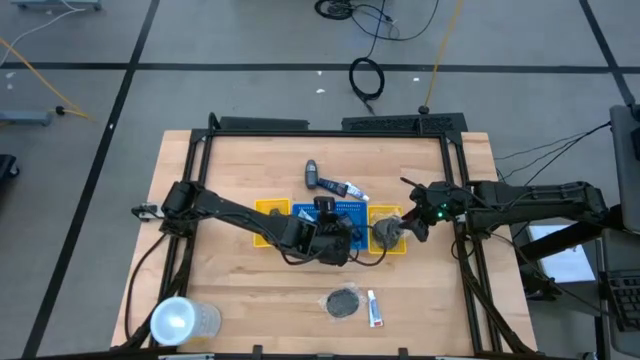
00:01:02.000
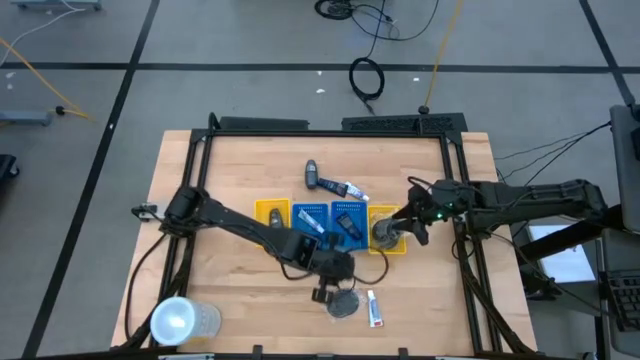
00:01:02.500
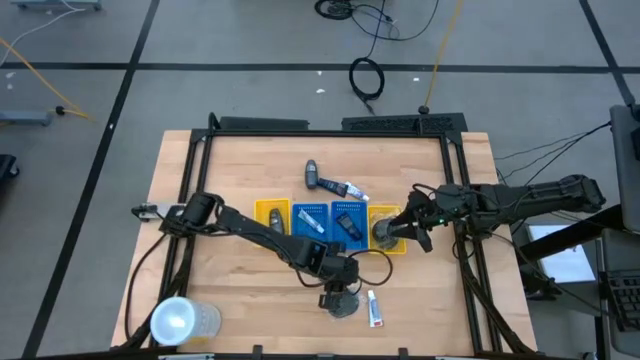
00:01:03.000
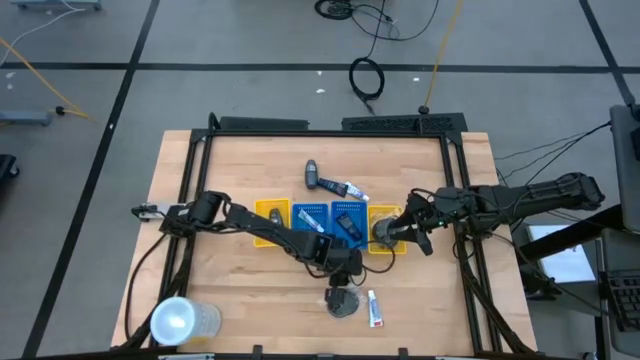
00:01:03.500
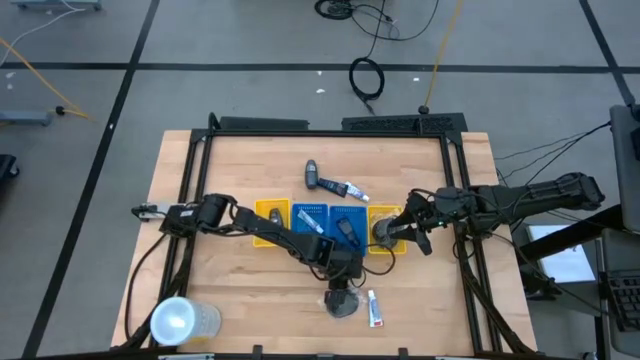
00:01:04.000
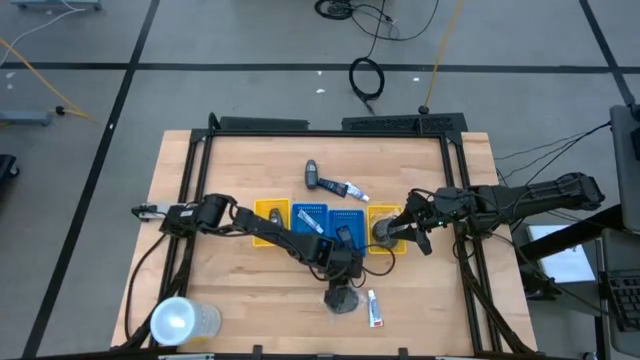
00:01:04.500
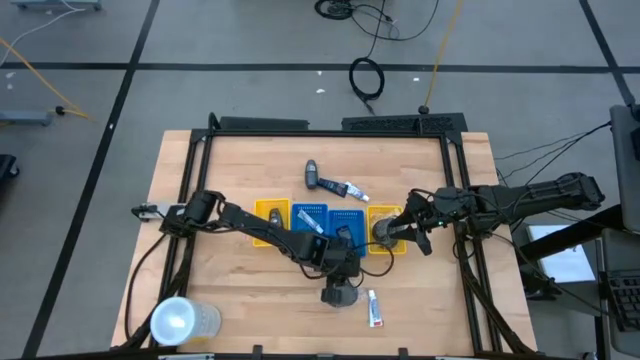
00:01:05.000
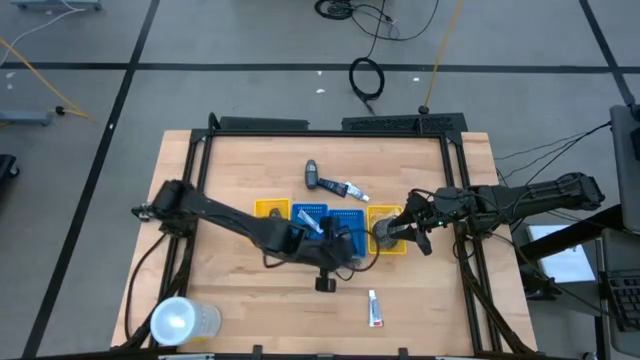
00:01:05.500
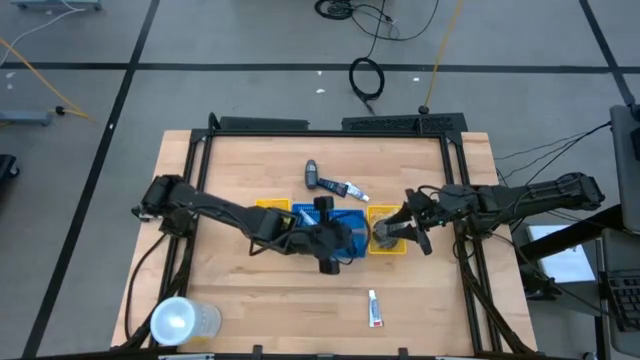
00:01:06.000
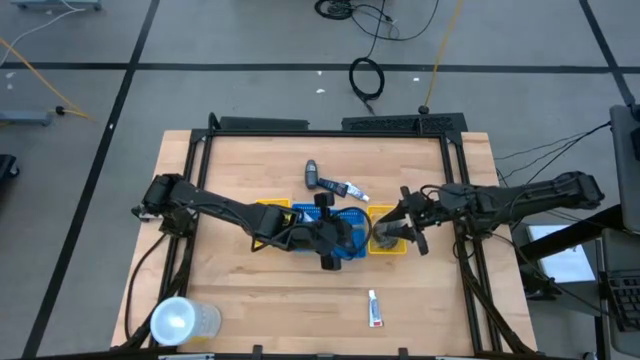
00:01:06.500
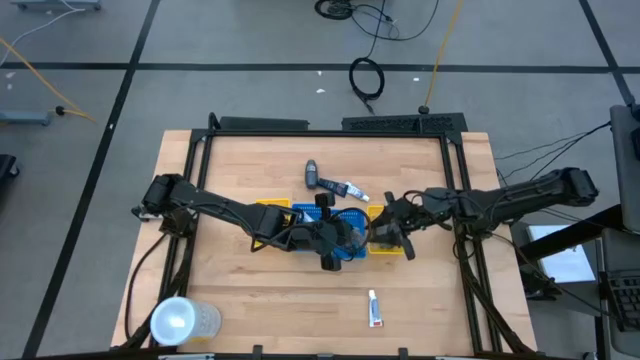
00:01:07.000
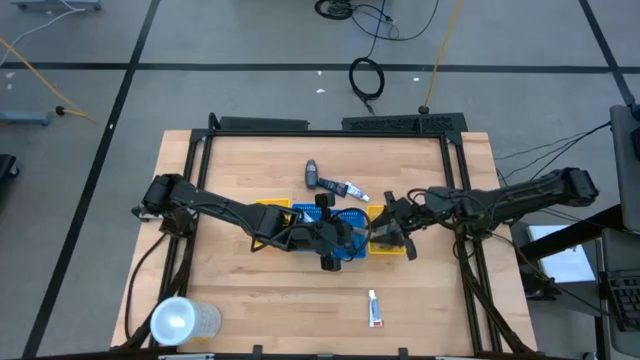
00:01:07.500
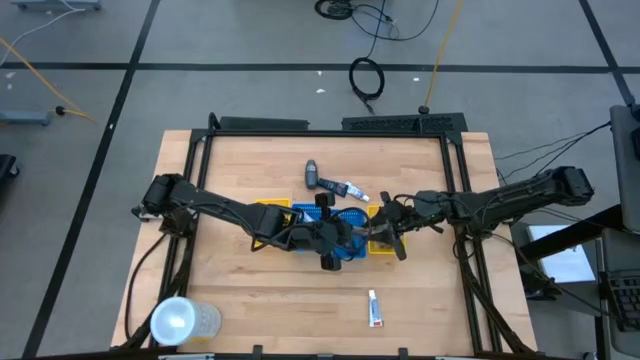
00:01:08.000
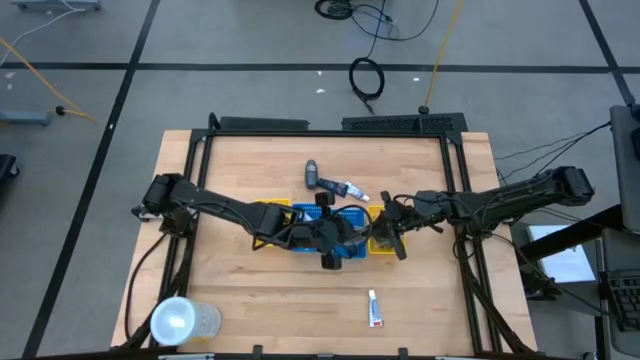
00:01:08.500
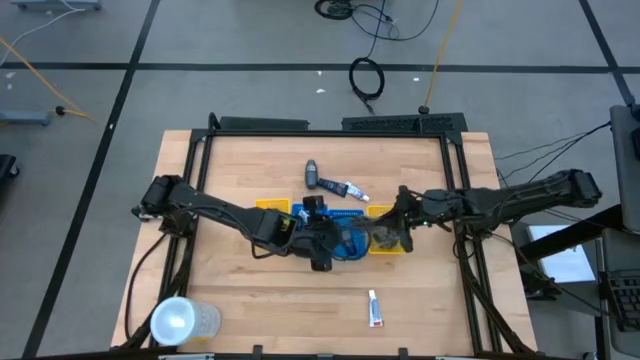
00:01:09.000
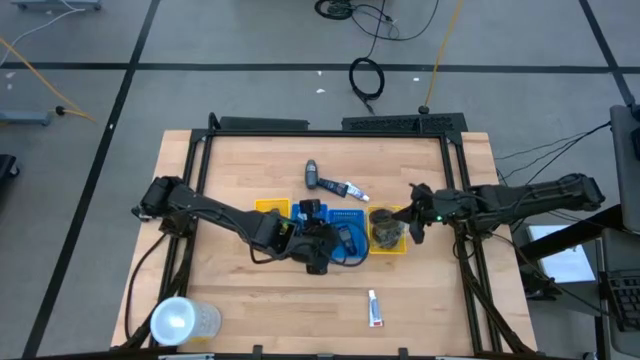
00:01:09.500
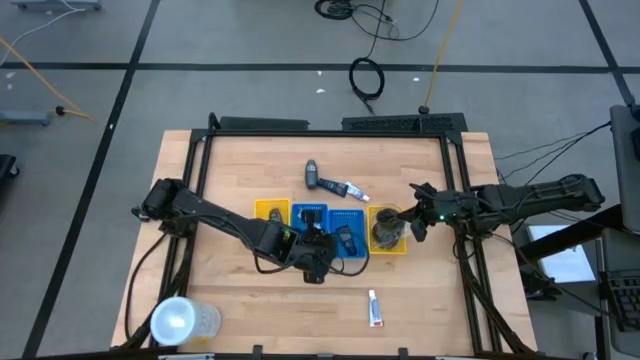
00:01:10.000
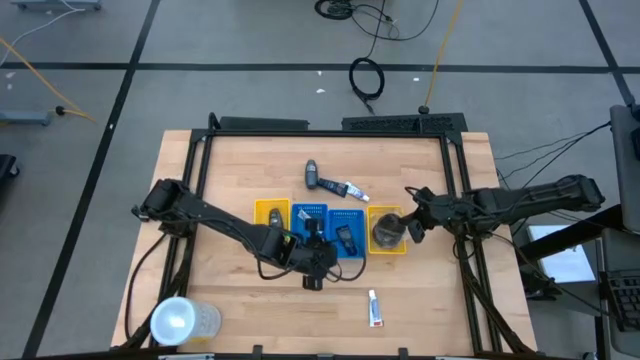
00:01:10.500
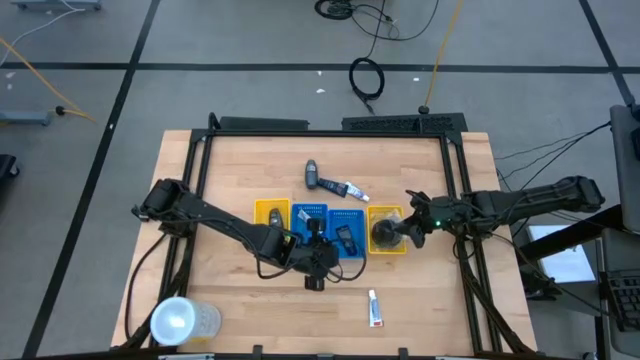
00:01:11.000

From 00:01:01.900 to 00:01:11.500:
Task: Pick & Place Travel size toiletries
Put the black hairbrush into the right yellow basket

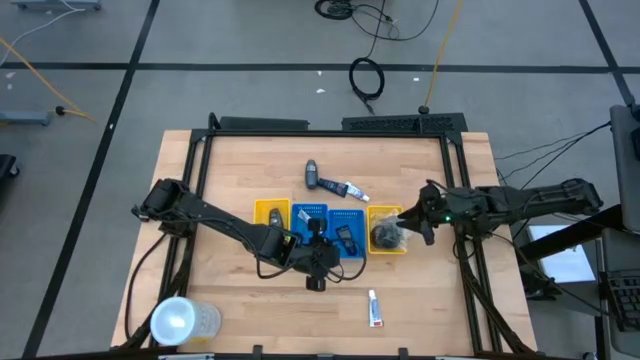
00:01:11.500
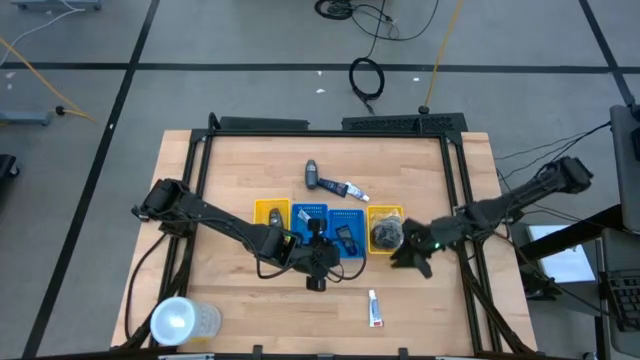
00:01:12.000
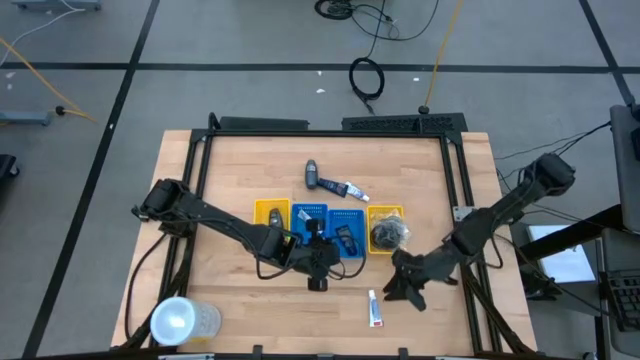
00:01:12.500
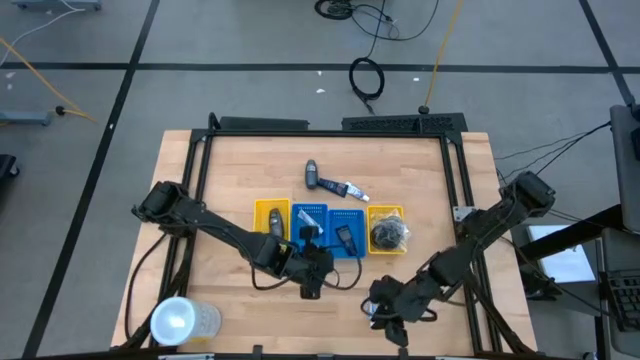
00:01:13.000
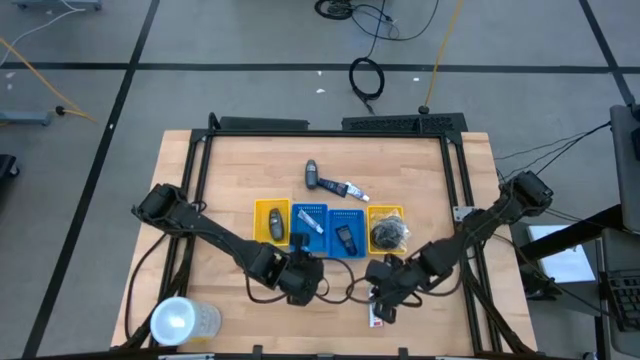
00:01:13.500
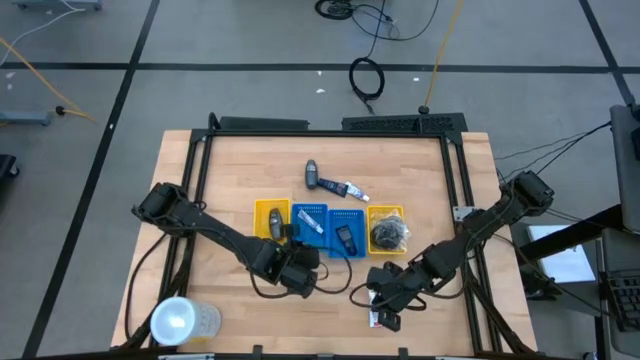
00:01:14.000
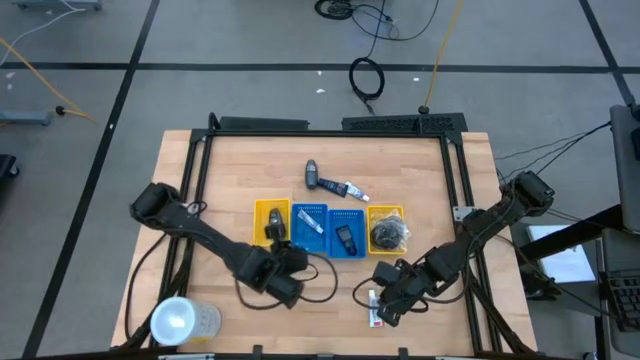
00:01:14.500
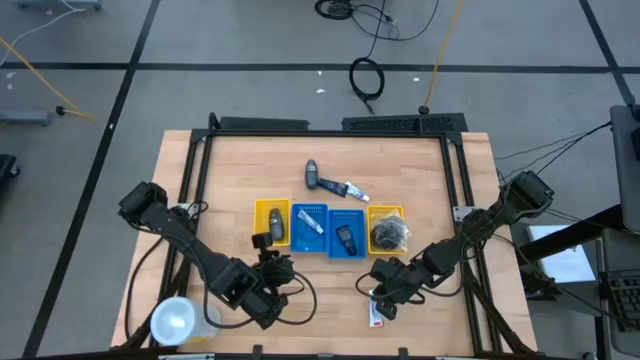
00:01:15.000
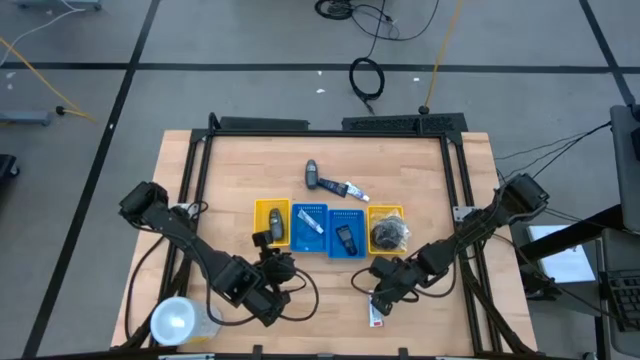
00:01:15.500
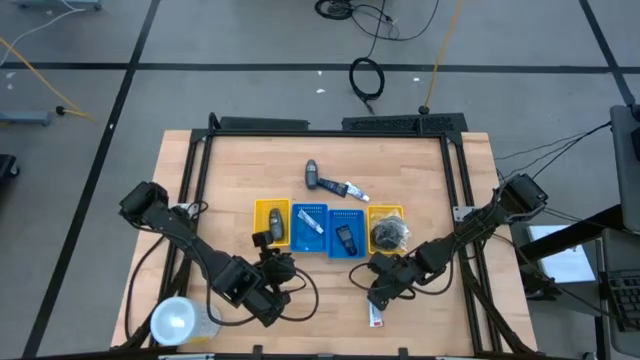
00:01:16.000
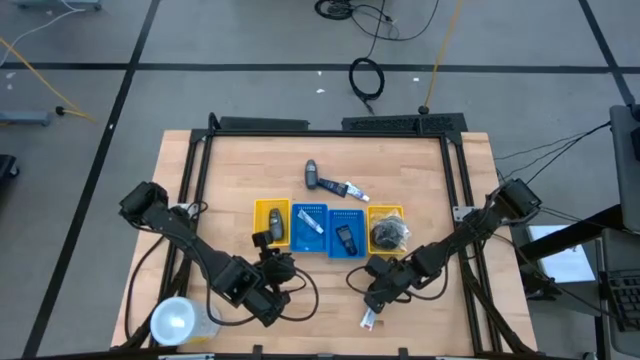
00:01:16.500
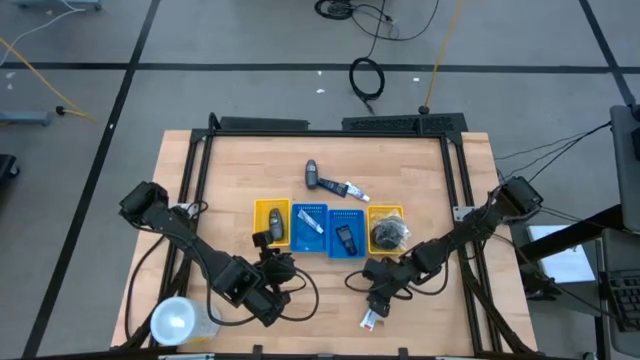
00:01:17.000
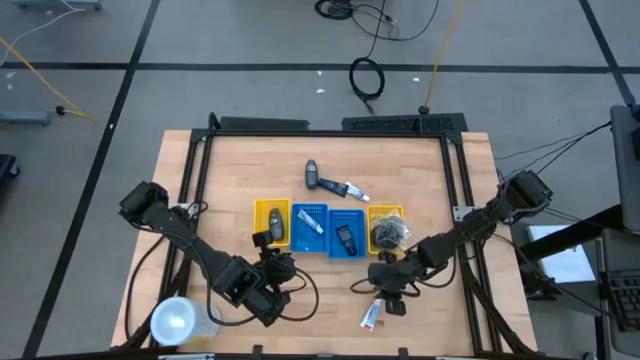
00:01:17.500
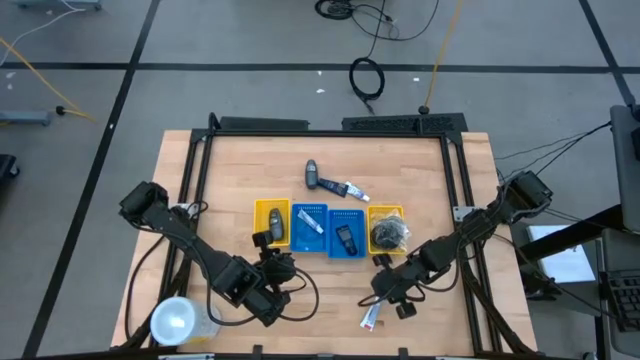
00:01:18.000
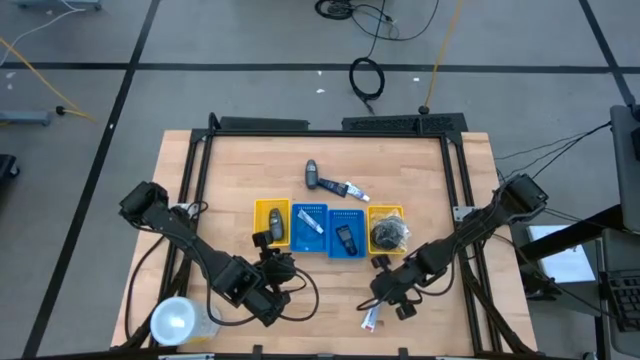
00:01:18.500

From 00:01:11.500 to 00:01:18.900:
Put the white toothpaste into the left blue basket

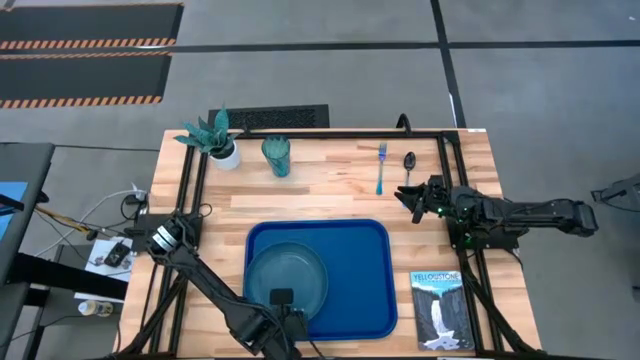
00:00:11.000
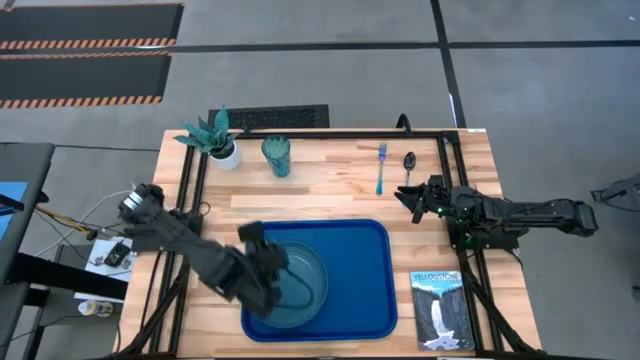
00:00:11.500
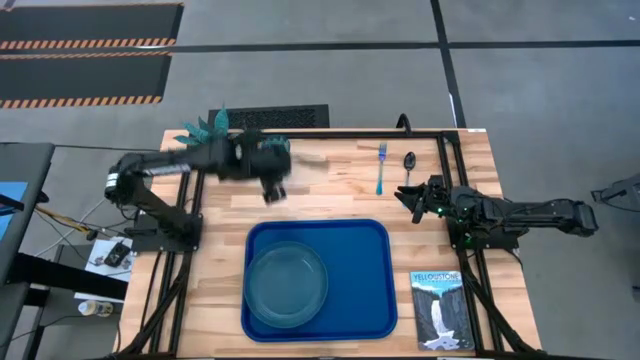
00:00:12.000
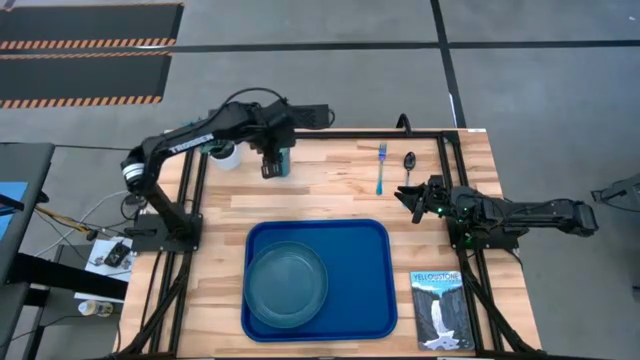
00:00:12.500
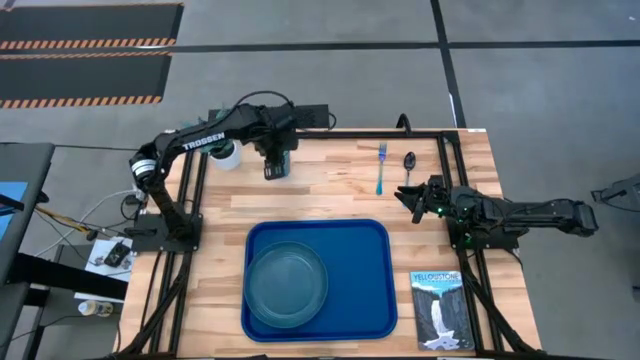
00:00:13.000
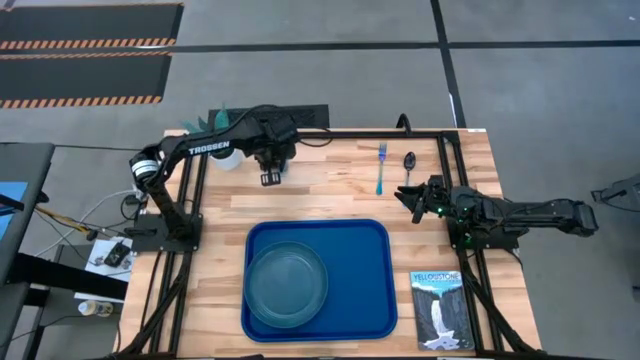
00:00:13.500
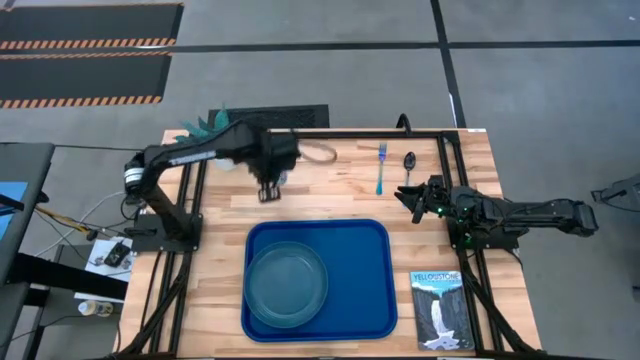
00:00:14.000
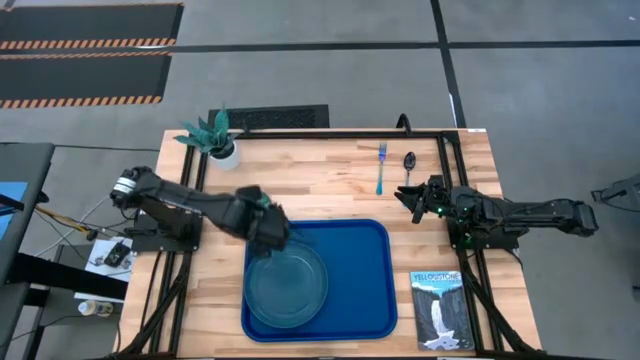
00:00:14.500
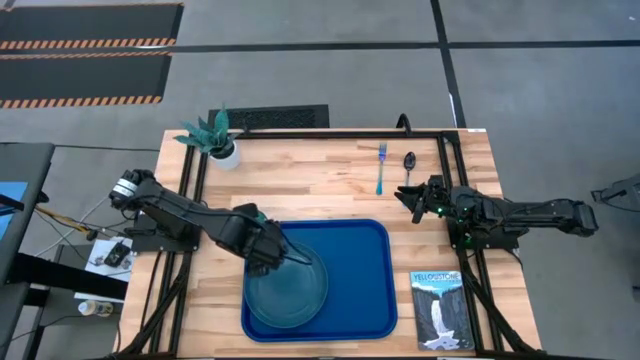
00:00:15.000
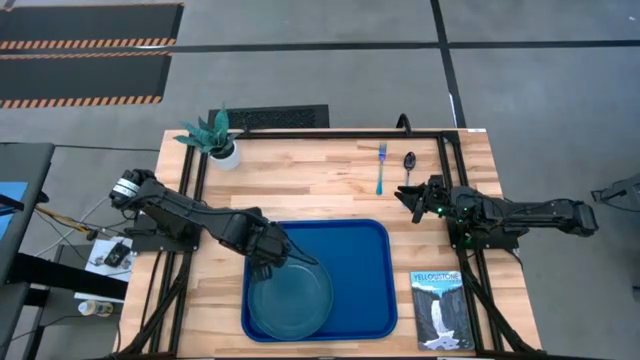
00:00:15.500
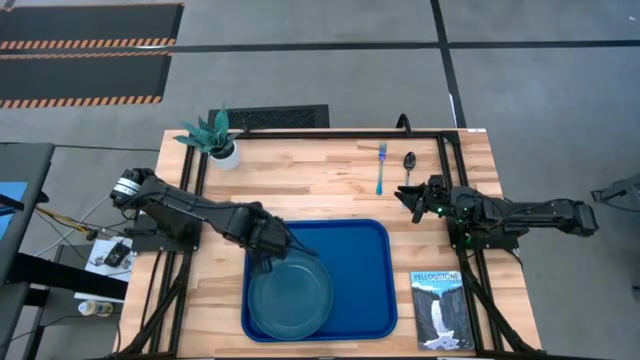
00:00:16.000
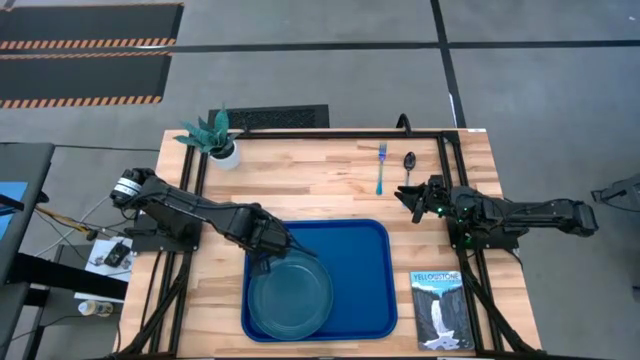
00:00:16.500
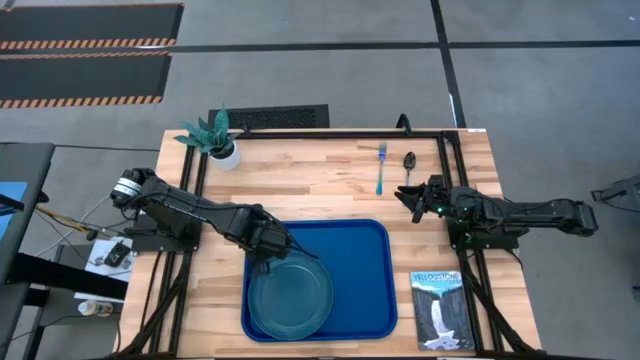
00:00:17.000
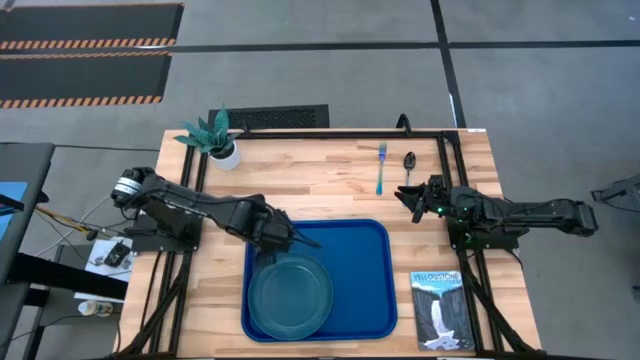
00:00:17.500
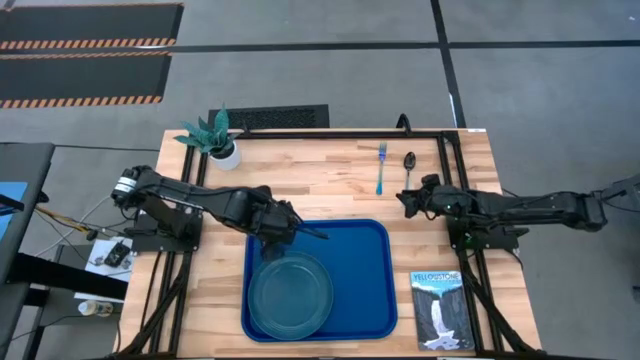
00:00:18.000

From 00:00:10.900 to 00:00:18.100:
Task: Pick and place plate/cup/fork/spoon on tray
Put the blue cup on the blue serving tray to the top left of the blue plate
